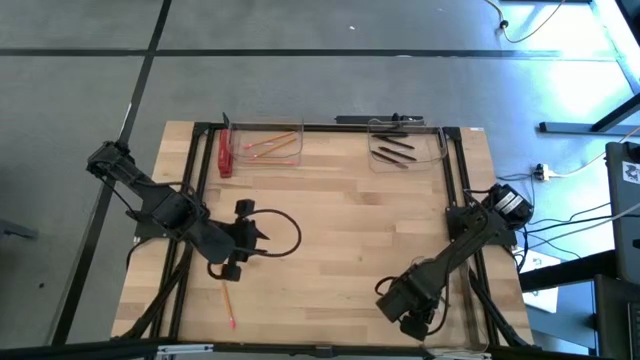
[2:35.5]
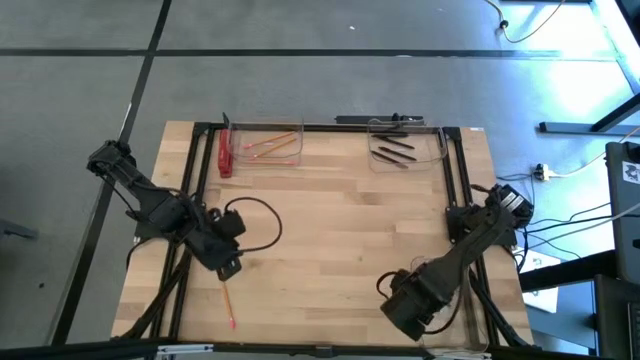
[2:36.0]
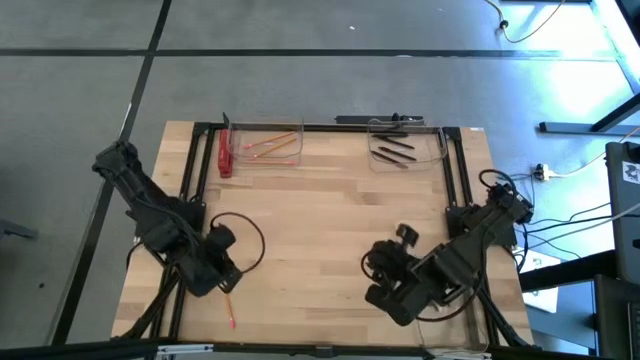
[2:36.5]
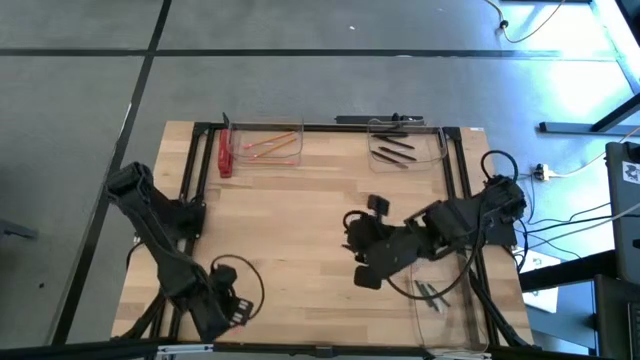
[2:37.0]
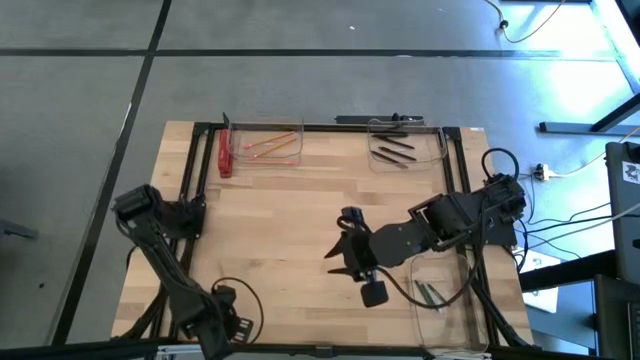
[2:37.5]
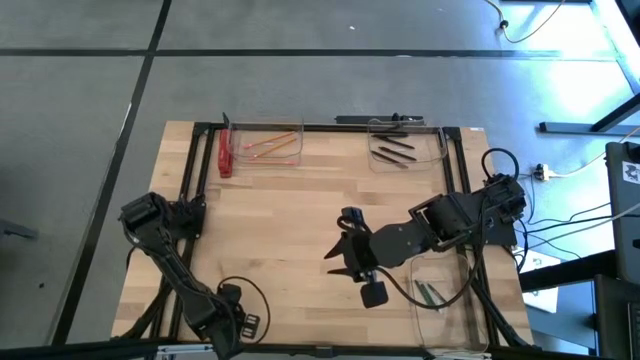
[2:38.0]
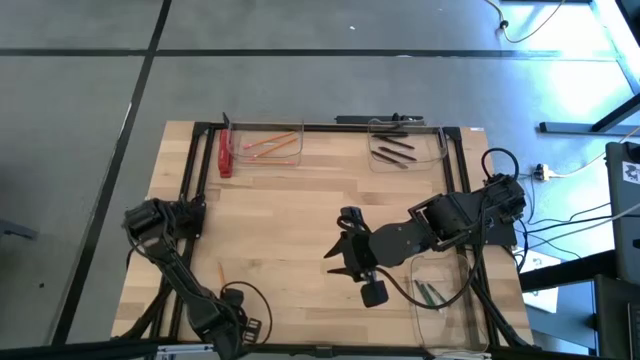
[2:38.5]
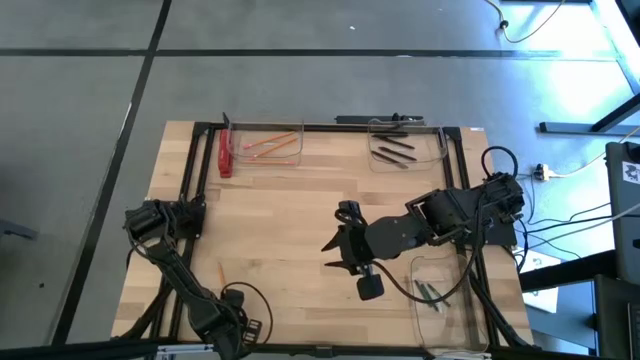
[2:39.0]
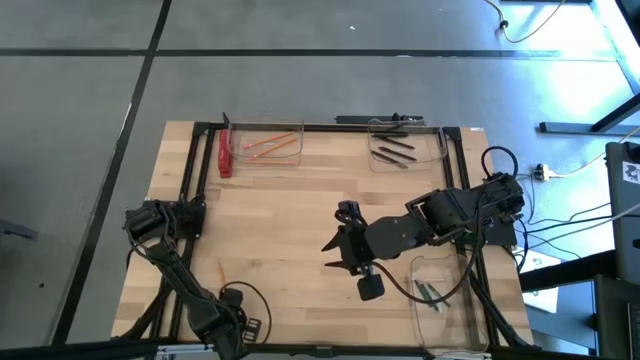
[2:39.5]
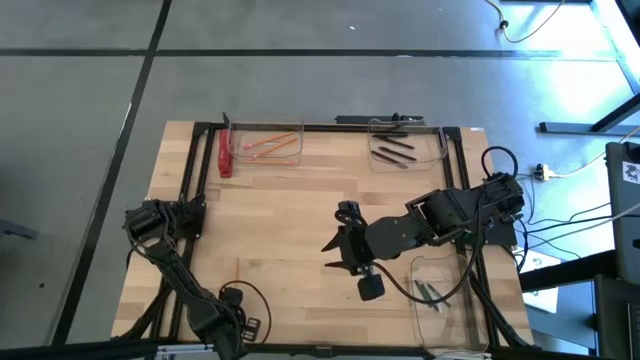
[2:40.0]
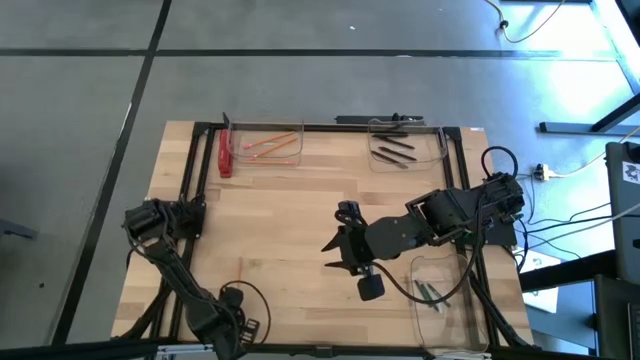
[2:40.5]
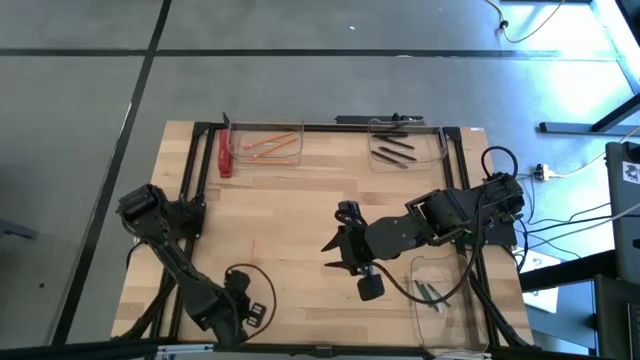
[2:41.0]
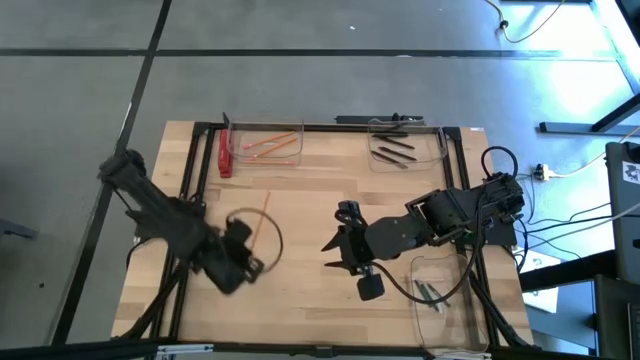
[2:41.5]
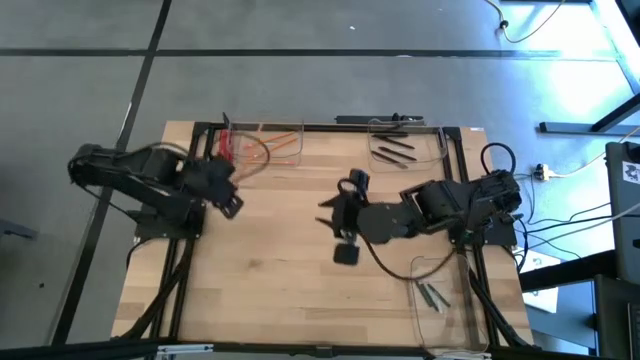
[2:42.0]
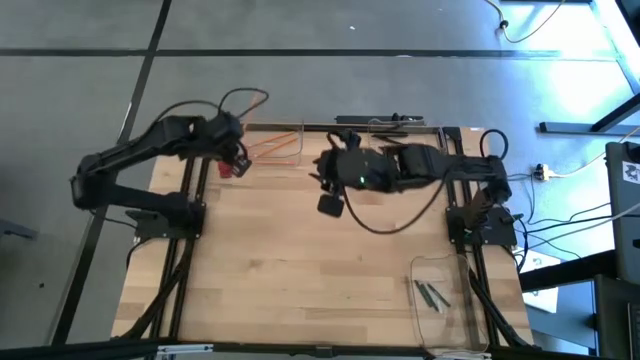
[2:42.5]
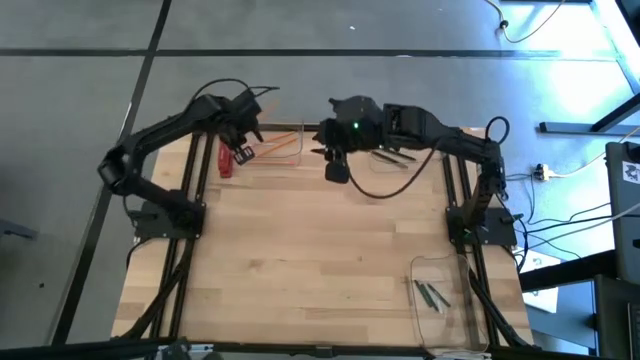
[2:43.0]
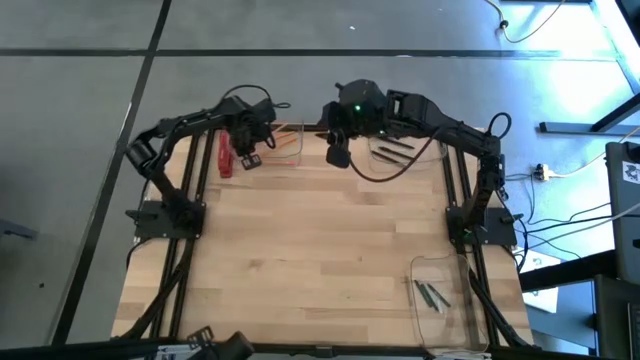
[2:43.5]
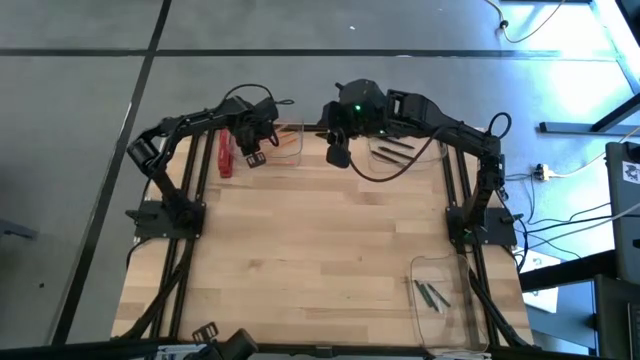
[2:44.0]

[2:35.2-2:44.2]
Task: Sort crayons/erasers/pens/pencils in bins
Put the yellow pencil into the top left transparent bin

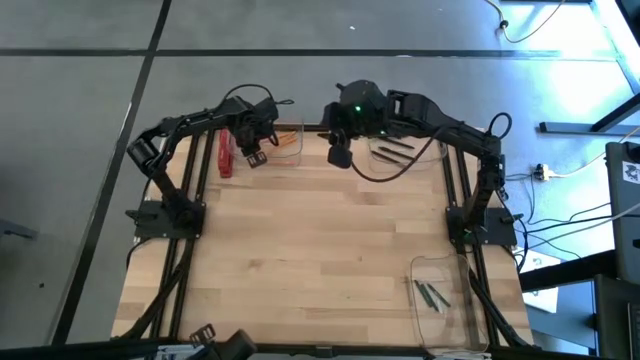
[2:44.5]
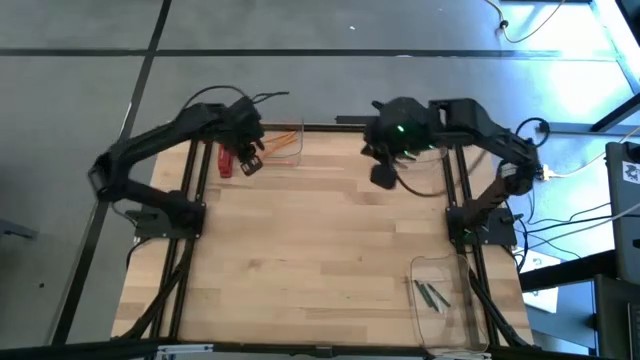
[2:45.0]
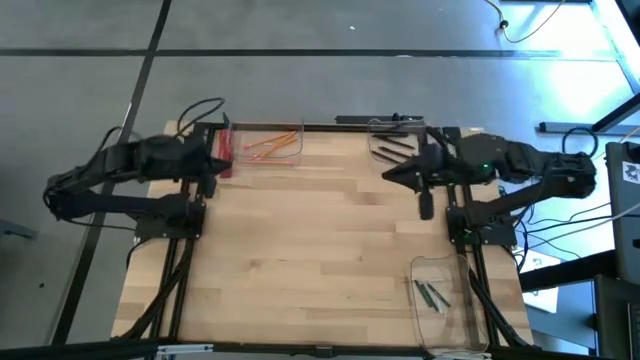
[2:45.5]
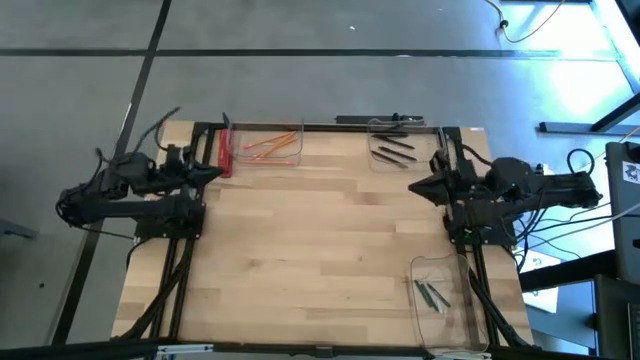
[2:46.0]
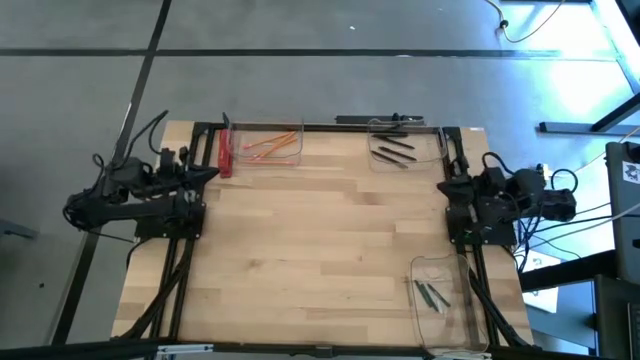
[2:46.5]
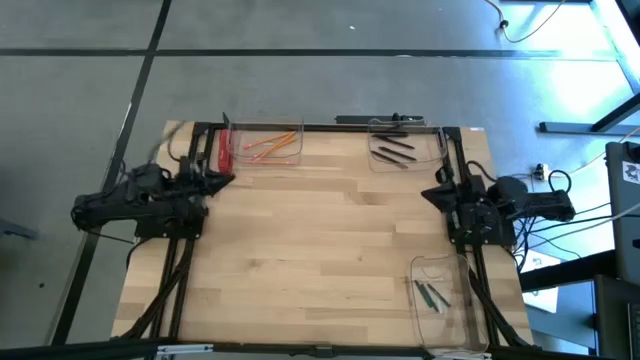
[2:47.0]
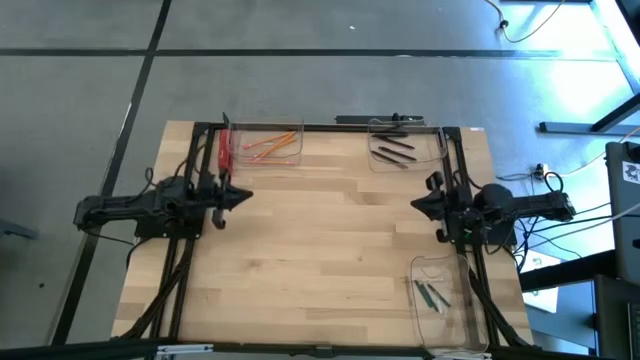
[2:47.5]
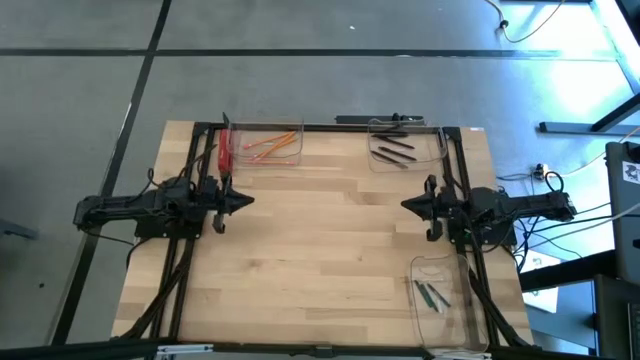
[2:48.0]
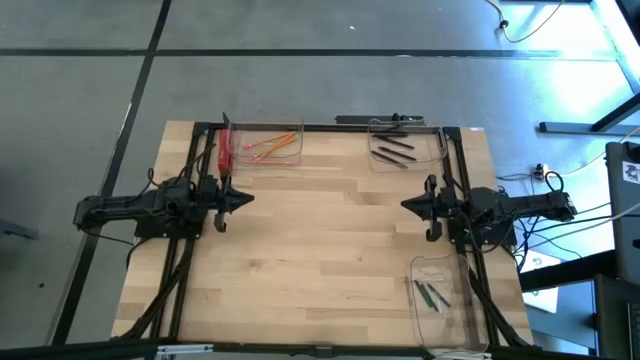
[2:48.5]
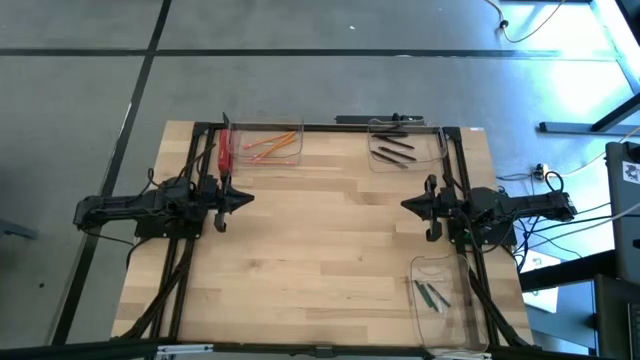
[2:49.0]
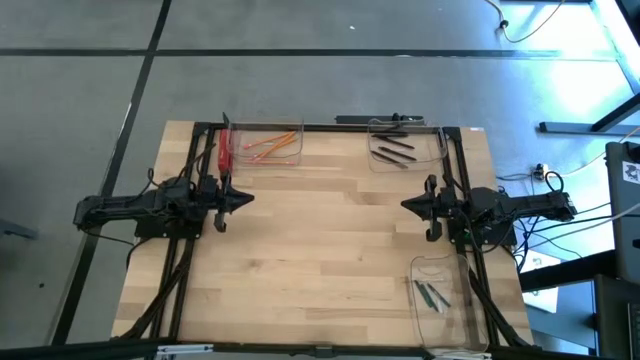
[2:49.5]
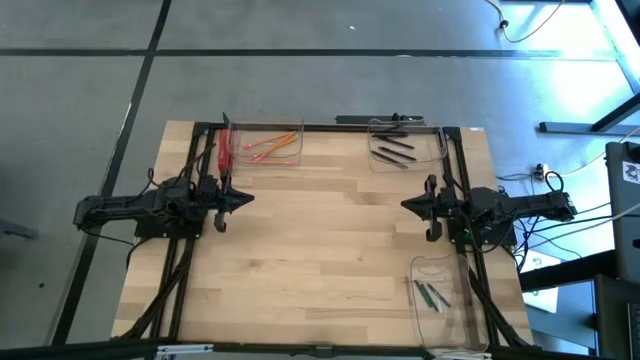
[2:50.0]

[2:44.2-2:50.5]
Return to Home Position

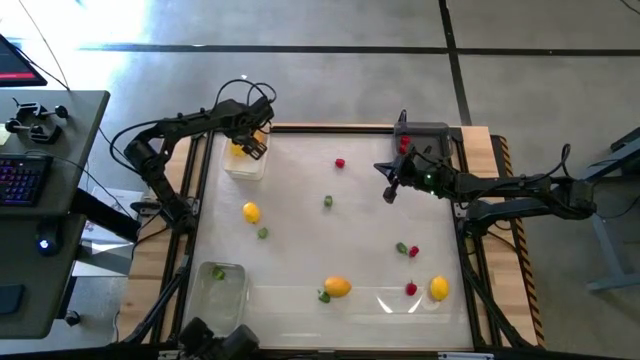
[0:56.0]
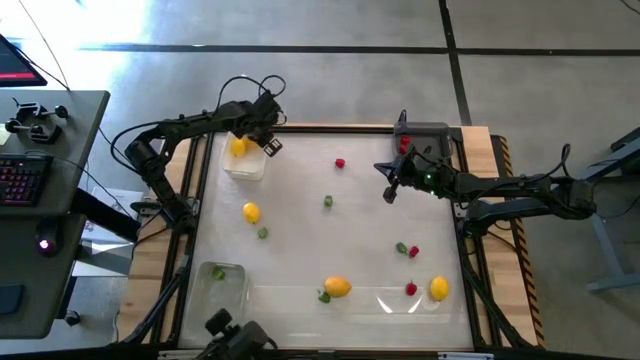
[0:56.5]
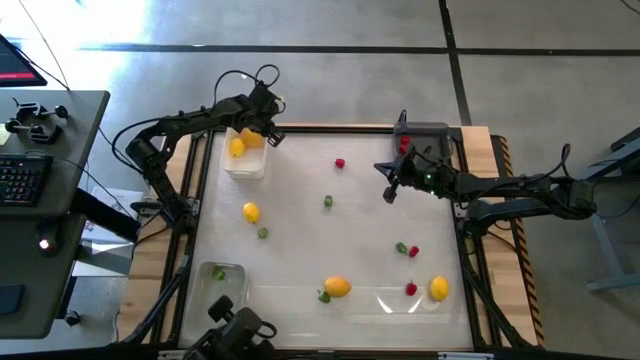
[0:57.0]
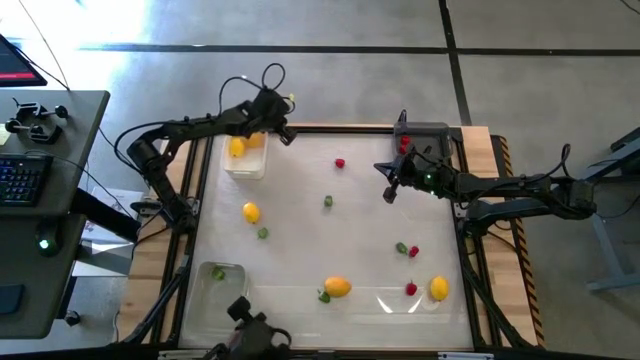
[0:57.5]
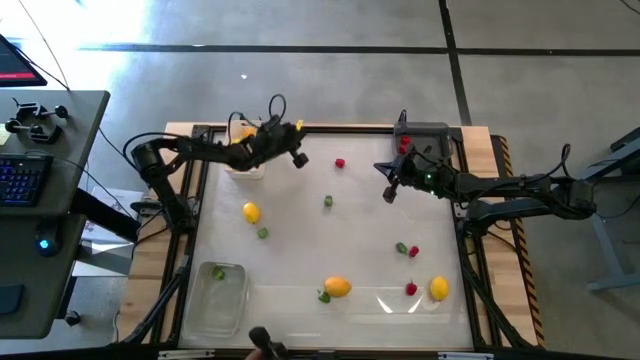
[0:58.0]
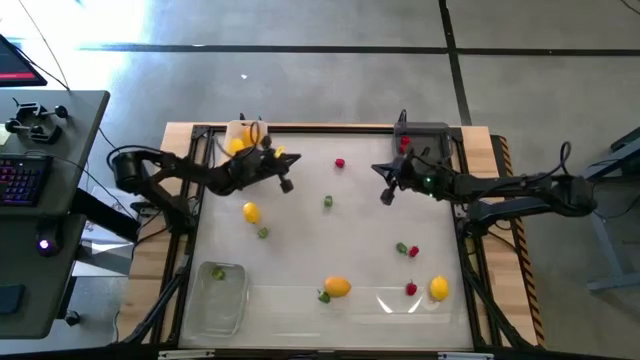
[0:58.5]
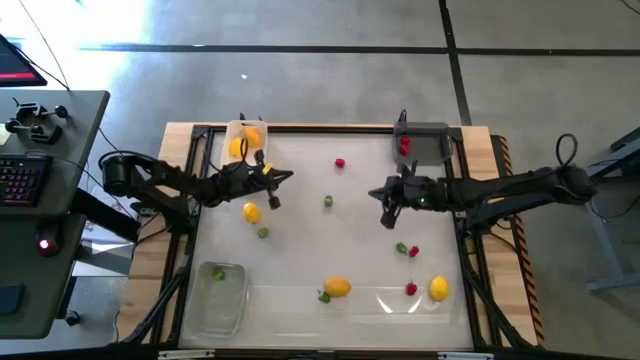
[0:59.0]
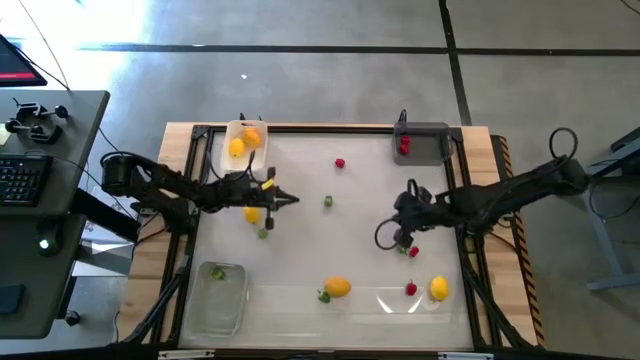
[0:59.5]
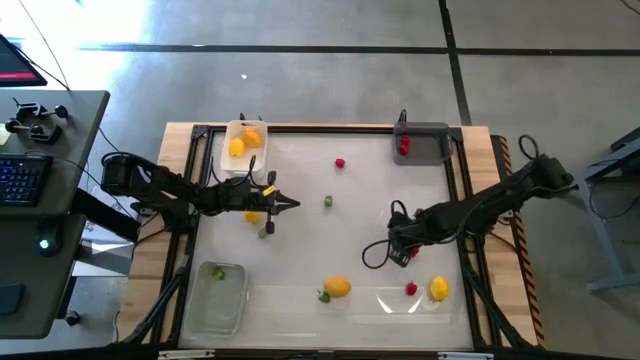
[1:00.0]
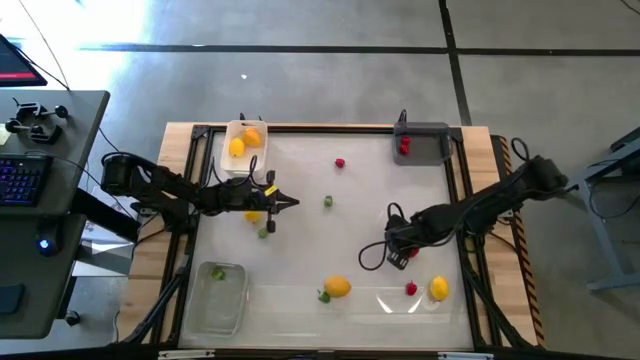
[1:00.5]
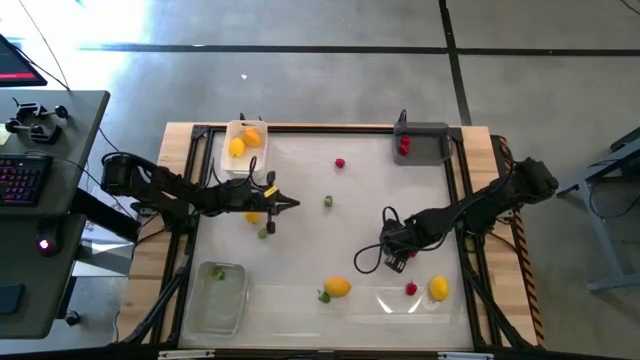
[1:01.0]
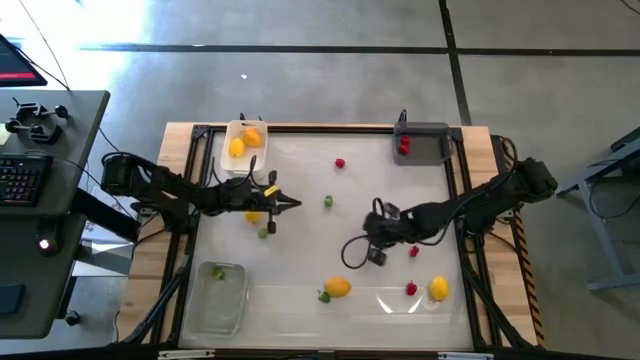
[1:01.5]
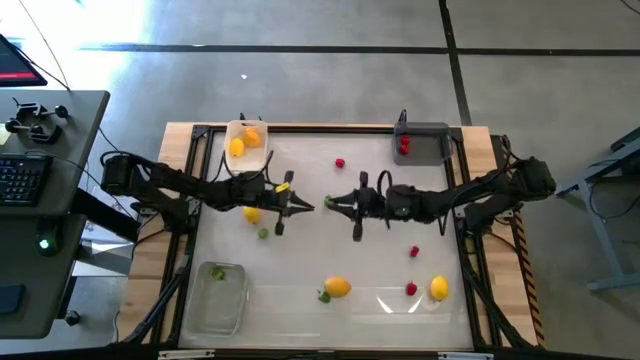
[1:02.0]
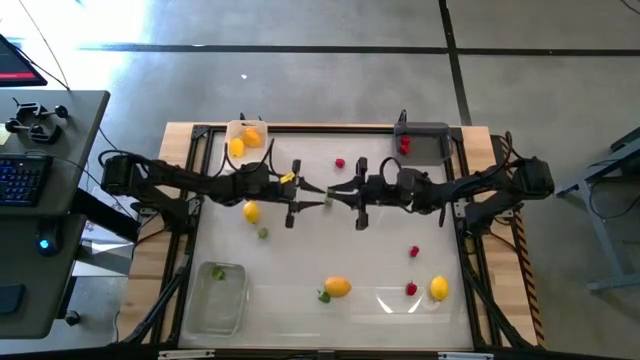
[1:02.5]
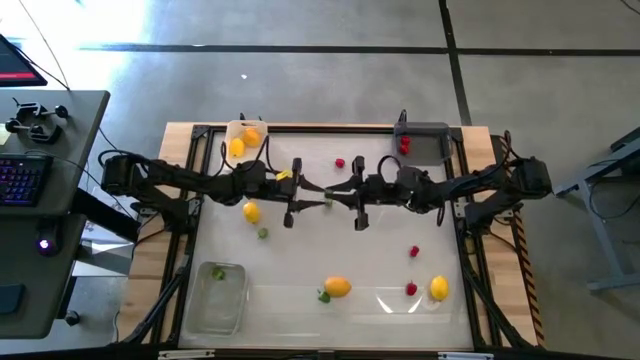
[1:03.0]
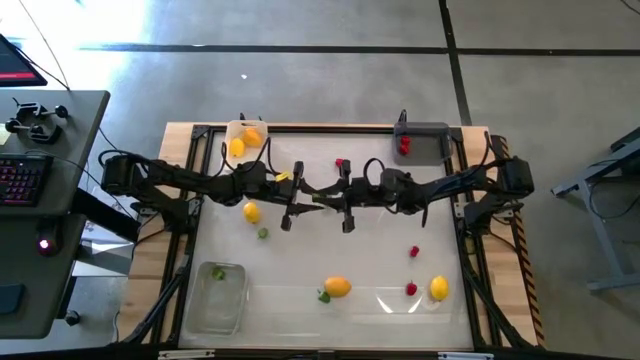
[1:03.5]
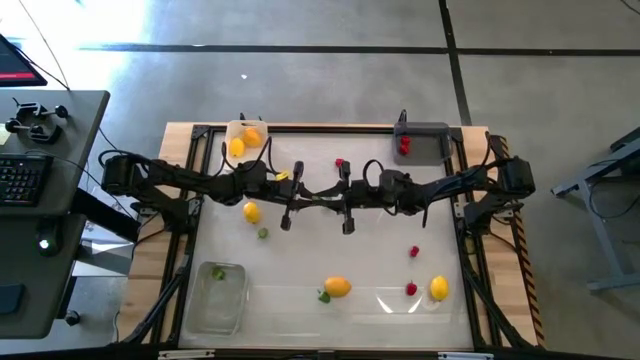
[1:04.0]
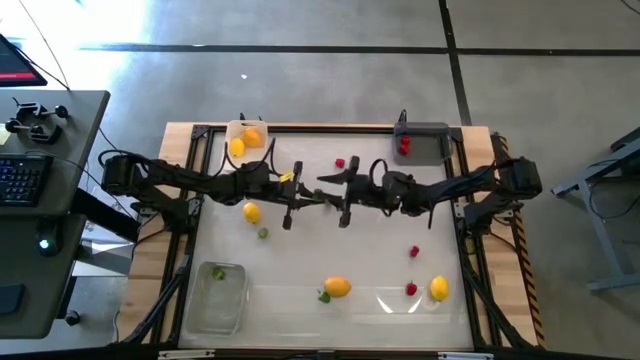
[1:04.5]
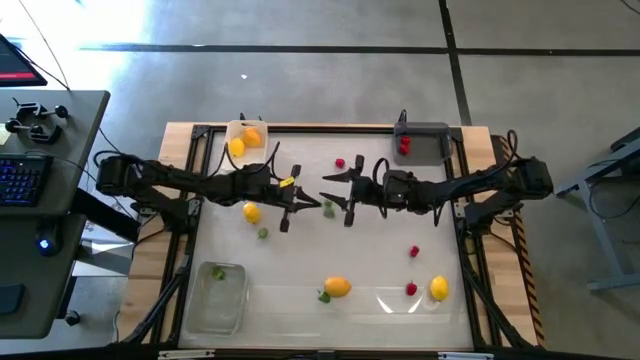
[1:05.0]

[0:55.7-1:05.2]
Task: Sort produce into baskets
Put the green bell pepper into the gray bin
